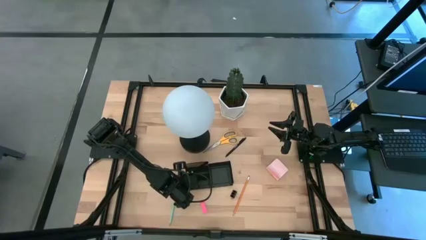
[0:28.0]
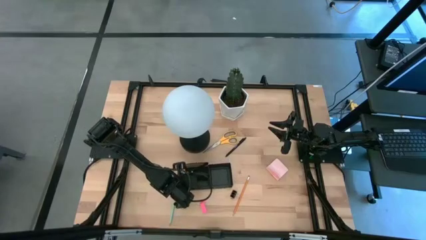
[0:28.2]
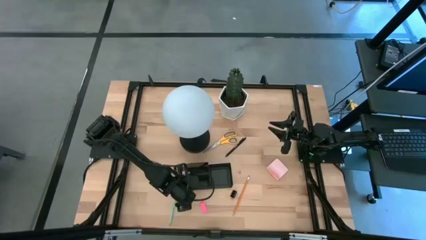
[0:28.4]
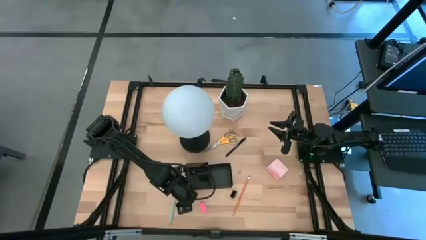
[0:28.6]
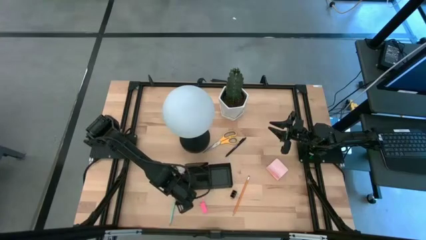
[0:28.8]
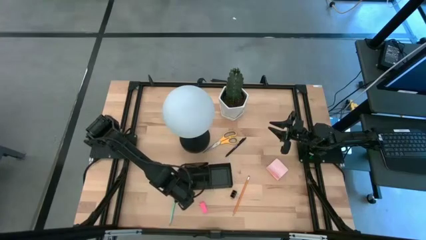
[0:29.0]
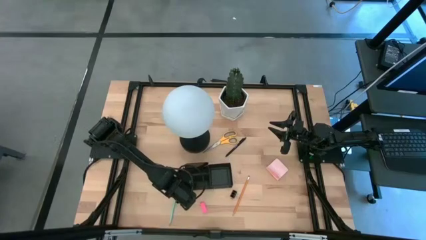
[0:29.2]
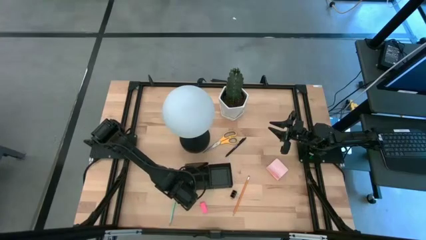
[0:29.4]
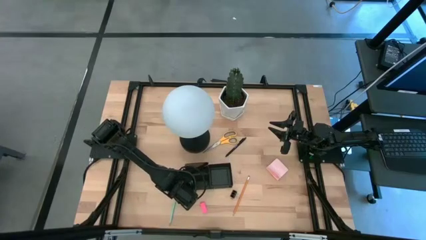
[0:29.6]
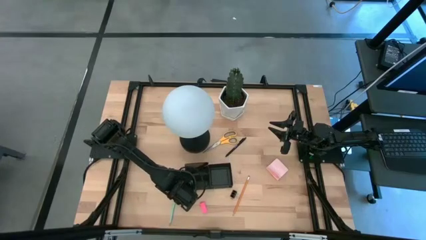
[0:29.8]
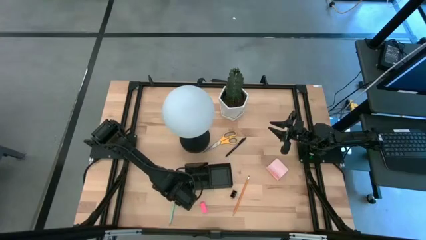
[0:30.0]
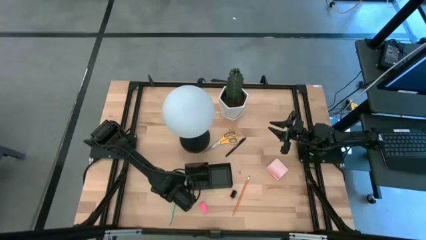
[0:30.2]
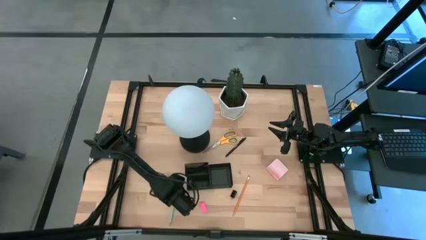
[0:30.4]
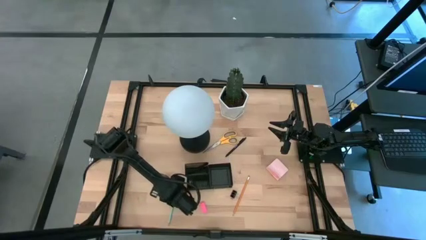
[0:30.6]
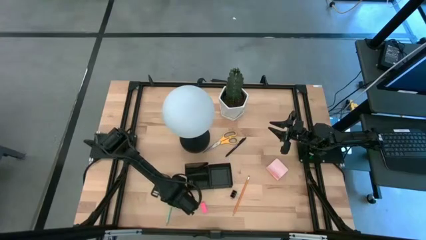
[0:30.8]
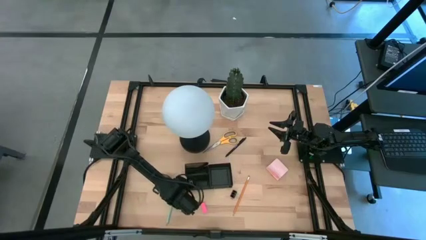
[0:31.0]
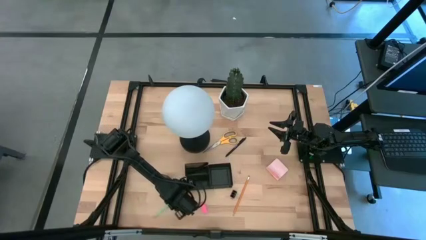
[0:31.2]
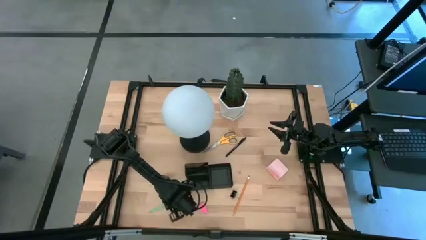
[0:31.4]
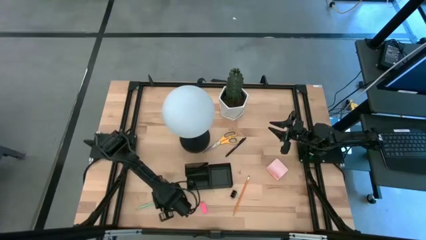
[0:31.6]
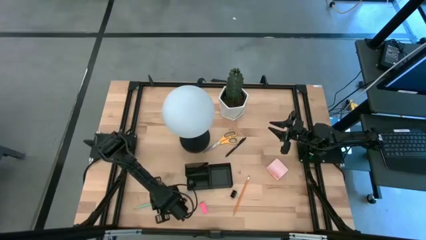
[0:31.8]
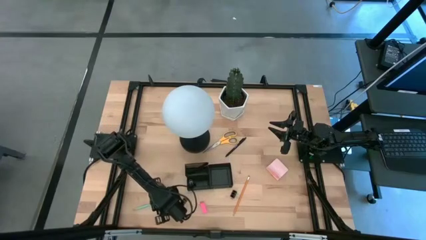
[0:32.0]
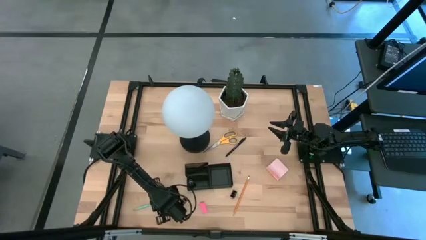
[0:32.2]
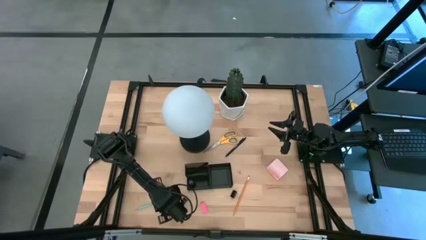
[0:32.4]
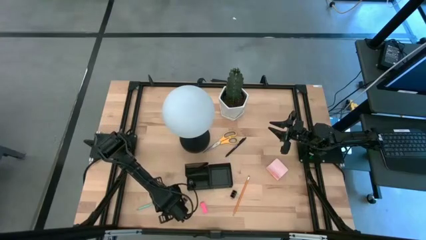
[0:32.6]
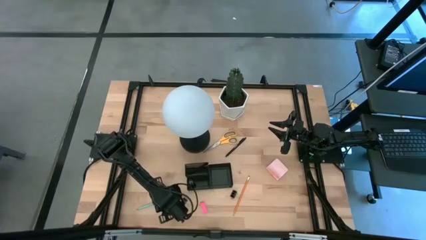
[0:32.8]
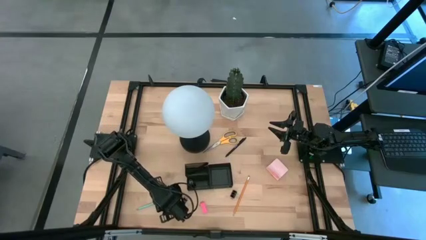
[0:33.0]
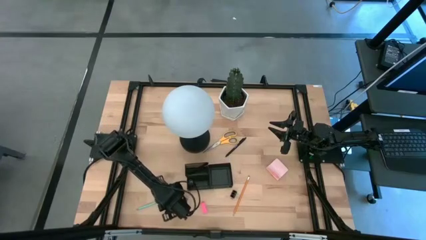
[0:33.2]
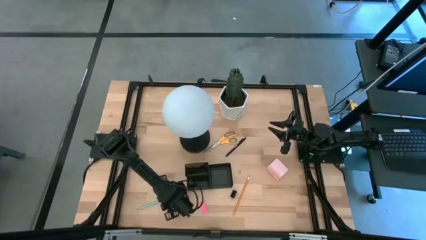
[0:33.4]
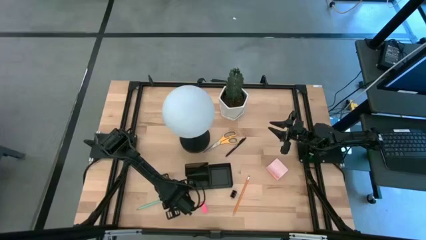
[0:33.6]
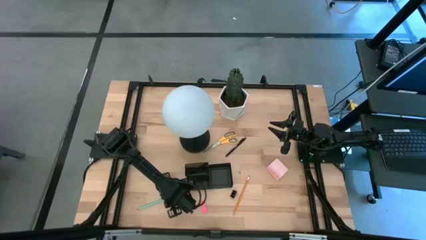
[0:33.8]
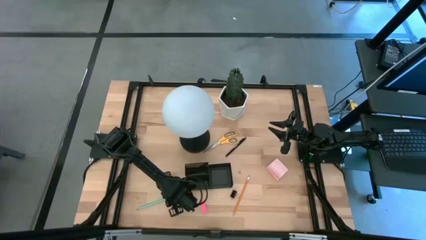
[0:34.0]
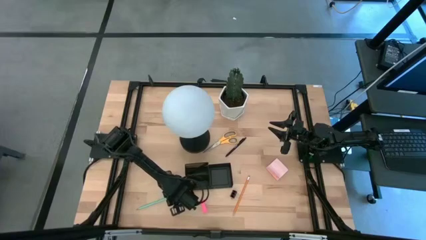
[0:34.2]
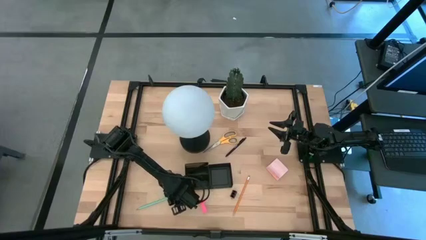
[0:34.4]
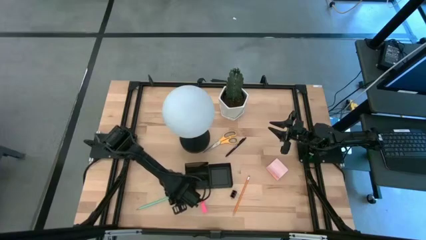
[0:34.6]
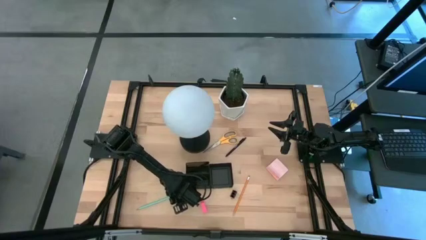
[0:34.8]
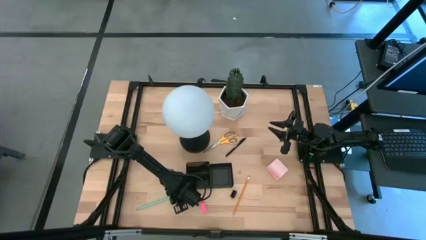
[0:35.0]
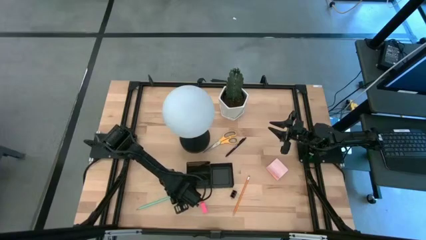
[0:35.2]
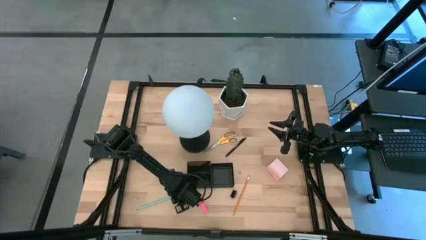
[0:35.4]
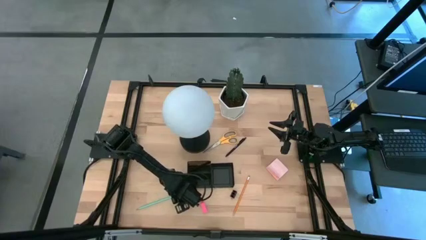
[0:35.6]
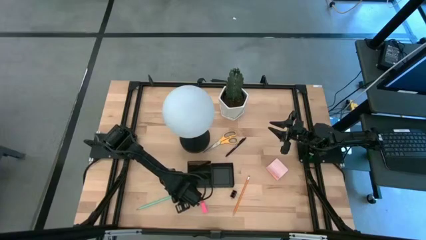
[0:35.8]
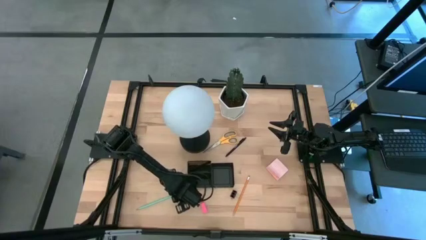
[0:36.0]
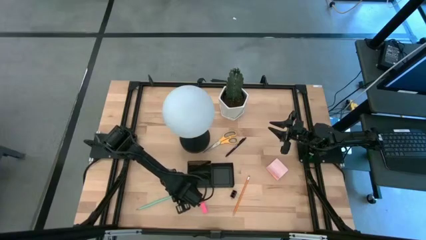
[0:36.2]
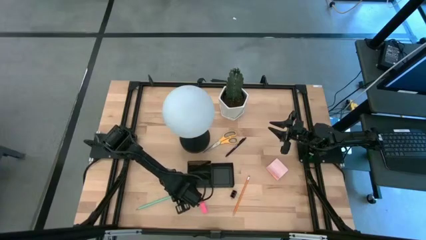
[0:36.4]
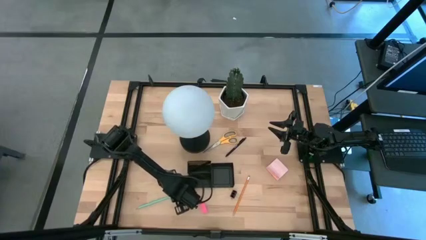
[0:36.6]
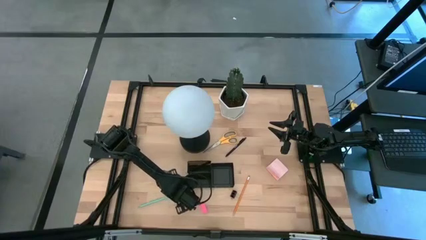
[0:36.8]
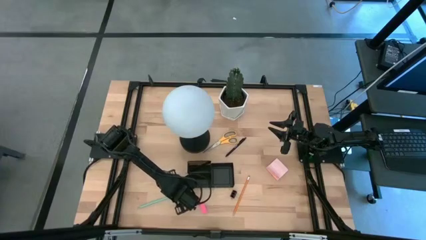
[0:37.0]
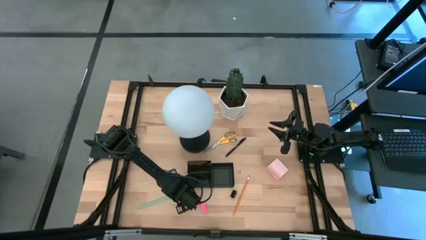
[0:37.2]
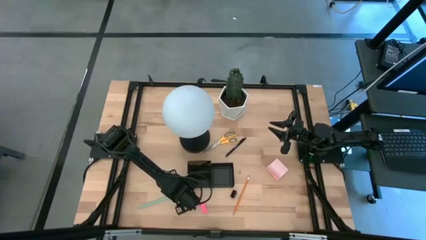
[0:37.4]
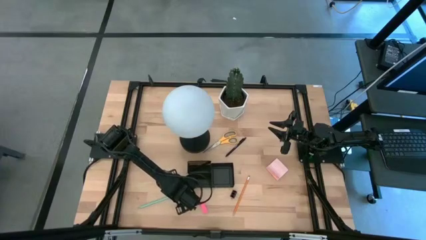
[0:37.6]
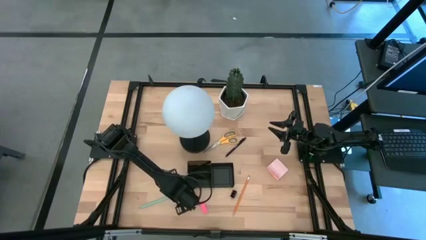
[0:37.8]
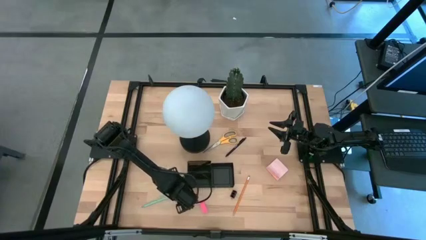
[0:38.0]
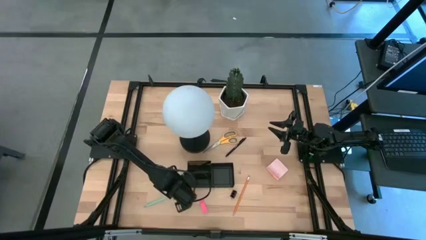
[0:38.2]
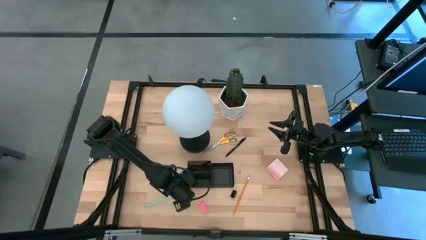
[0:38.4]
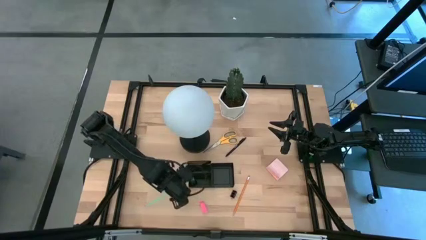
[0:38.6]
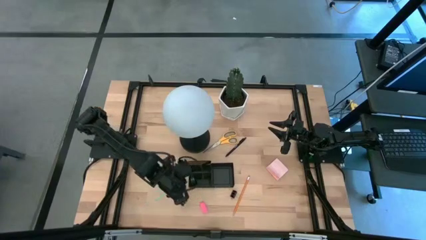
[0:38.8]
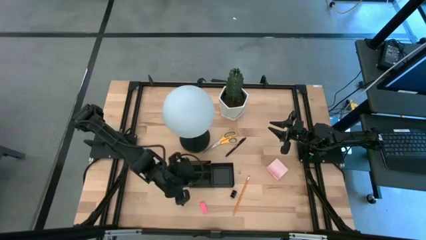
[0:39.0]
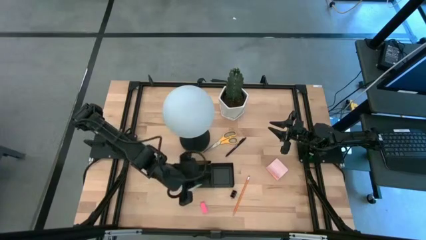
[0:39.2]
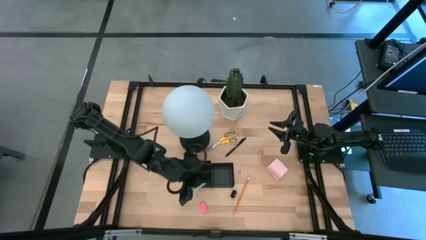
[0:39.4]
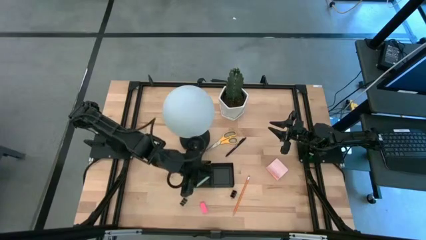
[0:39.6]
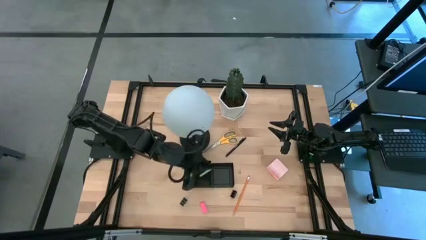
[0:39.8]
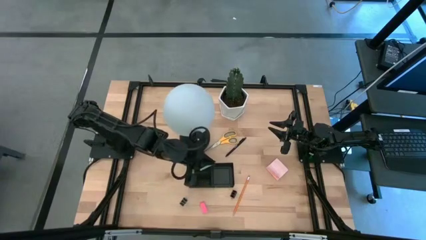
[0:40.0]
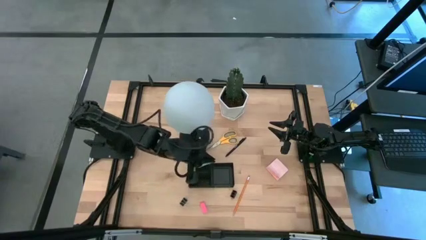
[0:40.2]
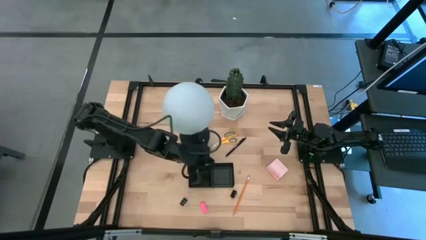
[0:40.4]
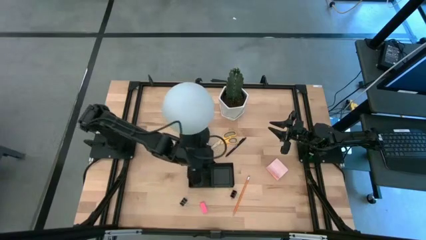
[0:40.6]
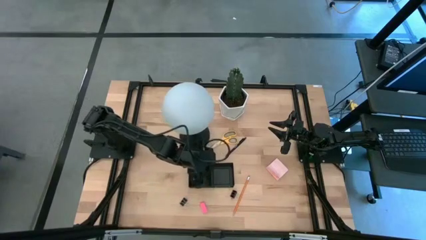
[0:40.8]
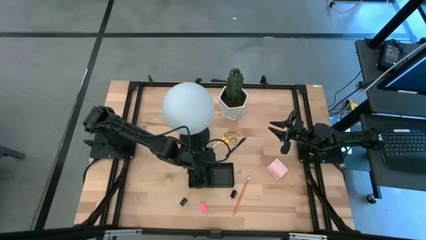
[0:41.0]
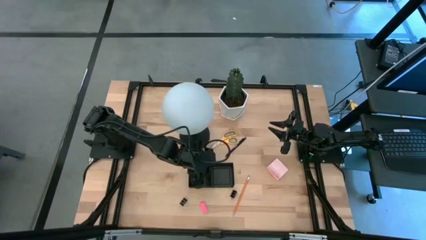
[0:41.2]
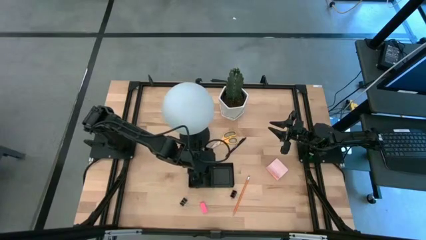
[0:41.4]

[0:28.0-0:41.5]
Task: Pick and place office supplies into organizer
Put the light blue pencil into the desk organizer
